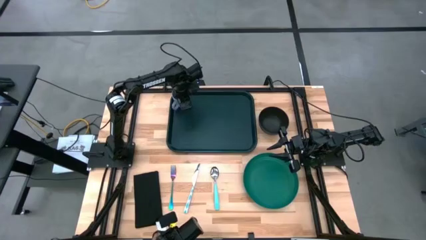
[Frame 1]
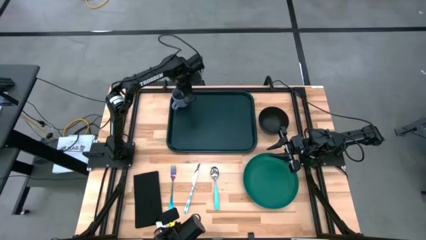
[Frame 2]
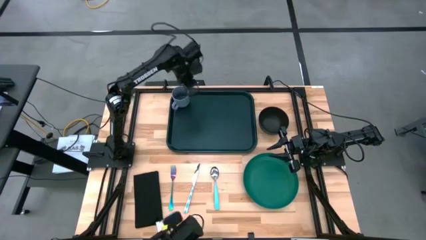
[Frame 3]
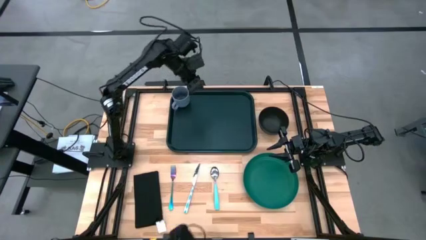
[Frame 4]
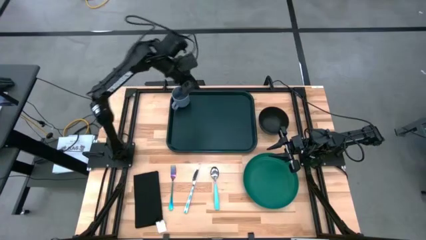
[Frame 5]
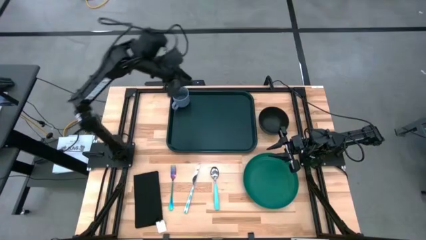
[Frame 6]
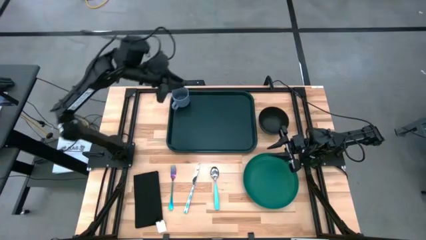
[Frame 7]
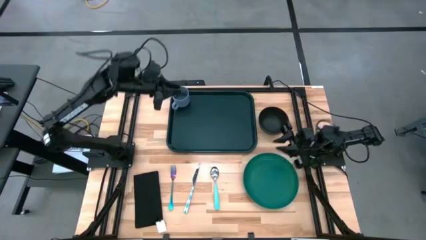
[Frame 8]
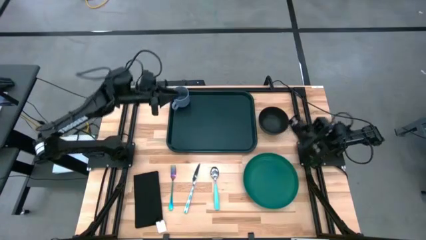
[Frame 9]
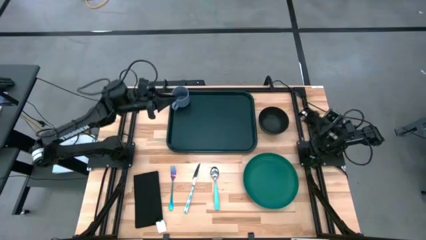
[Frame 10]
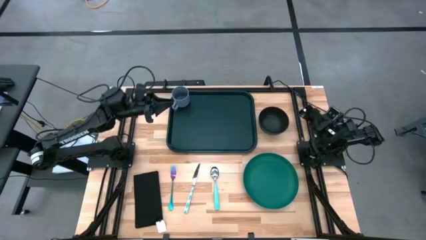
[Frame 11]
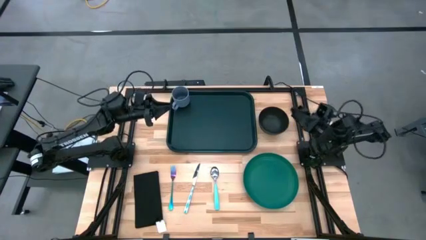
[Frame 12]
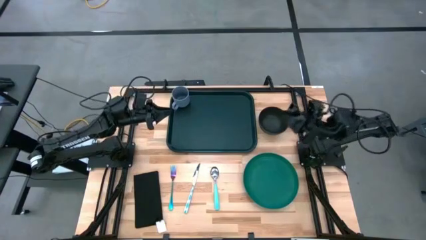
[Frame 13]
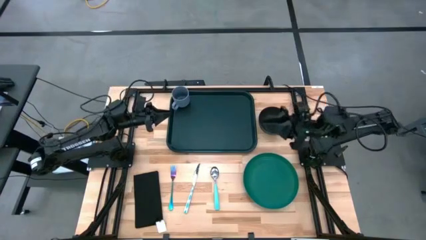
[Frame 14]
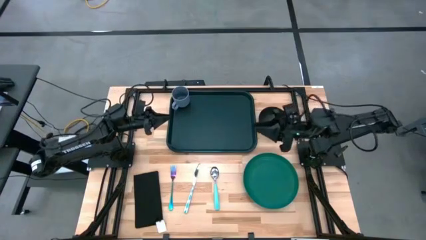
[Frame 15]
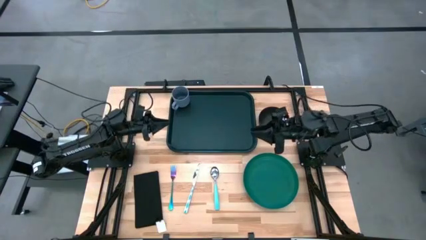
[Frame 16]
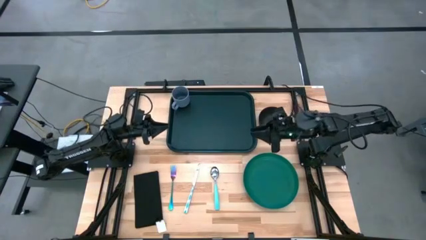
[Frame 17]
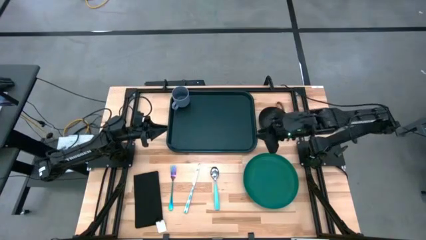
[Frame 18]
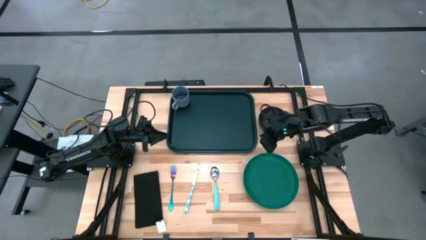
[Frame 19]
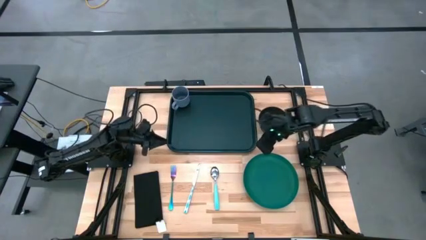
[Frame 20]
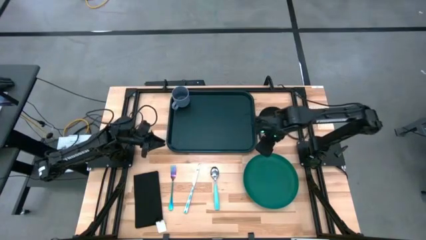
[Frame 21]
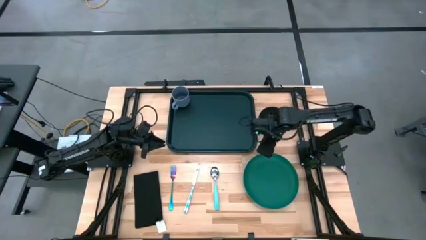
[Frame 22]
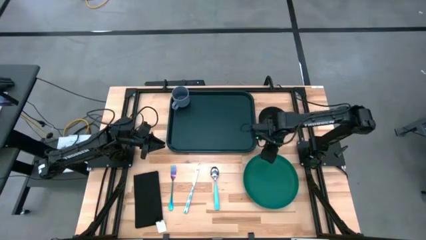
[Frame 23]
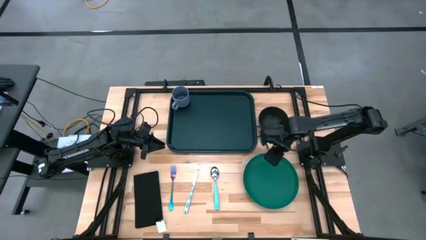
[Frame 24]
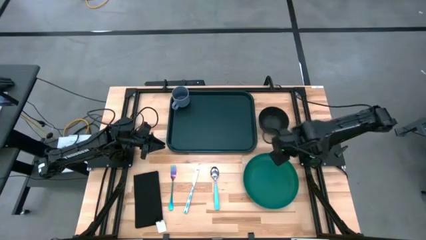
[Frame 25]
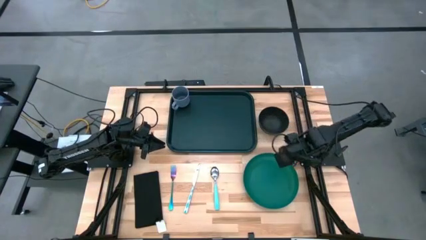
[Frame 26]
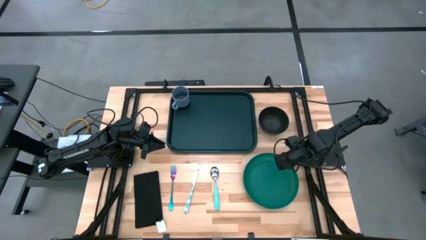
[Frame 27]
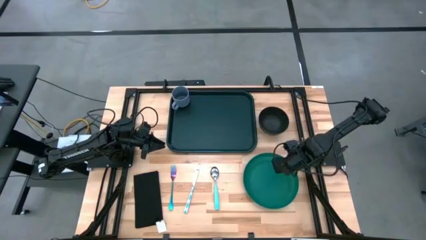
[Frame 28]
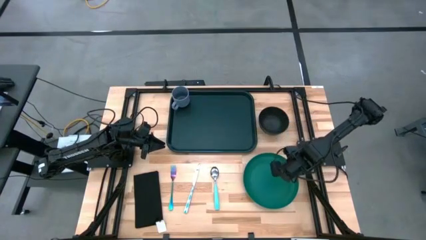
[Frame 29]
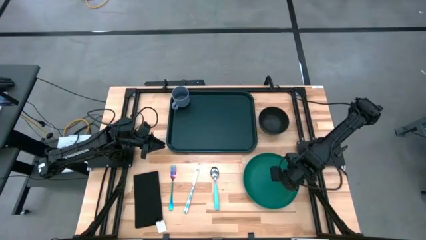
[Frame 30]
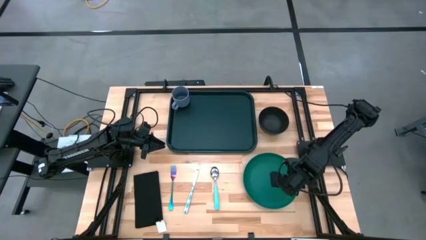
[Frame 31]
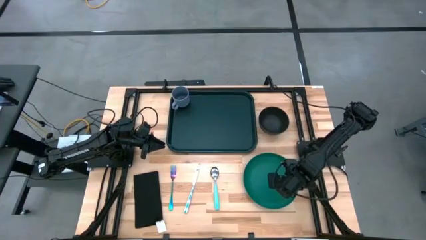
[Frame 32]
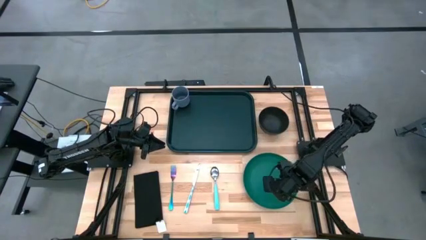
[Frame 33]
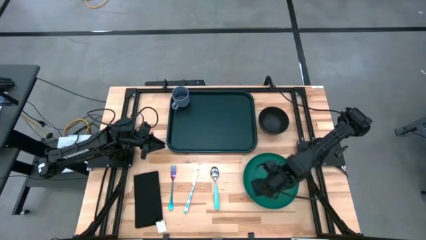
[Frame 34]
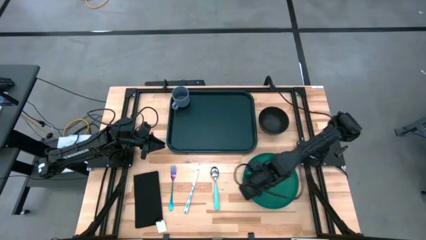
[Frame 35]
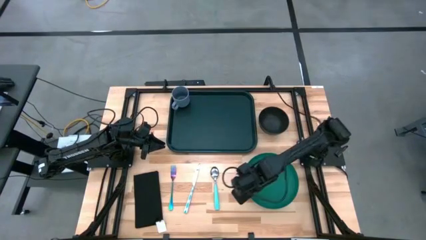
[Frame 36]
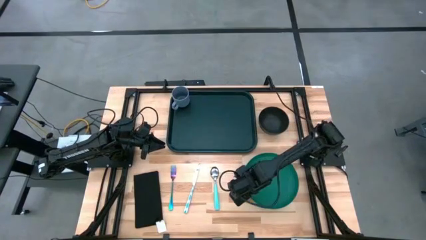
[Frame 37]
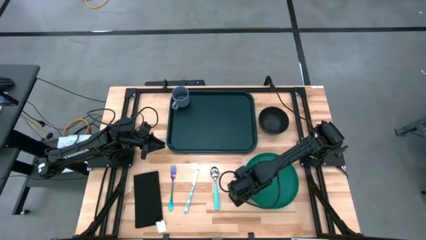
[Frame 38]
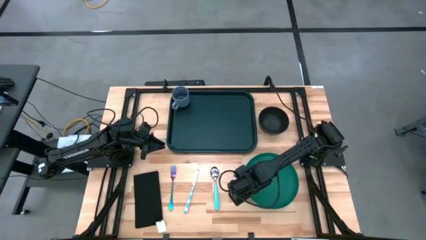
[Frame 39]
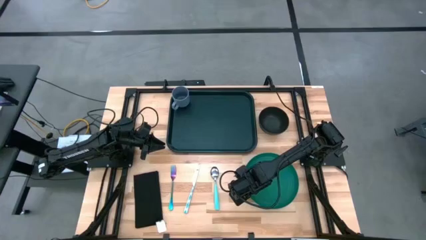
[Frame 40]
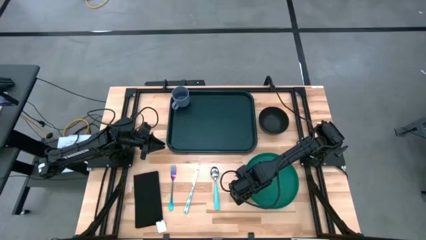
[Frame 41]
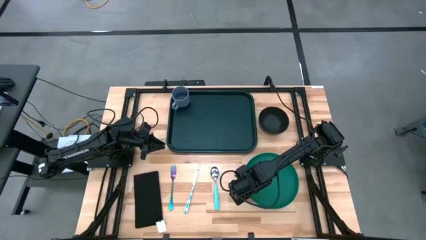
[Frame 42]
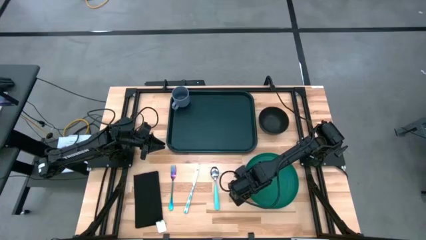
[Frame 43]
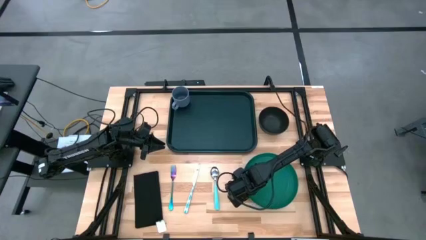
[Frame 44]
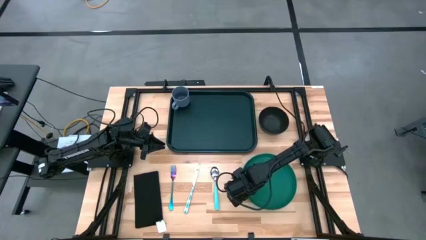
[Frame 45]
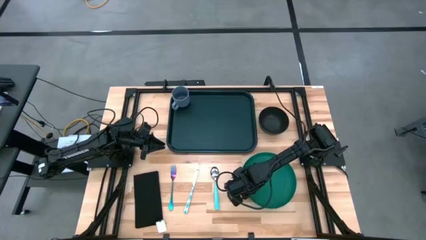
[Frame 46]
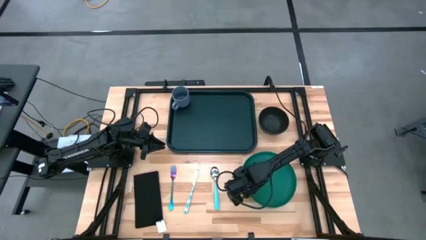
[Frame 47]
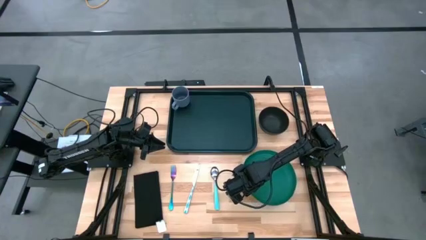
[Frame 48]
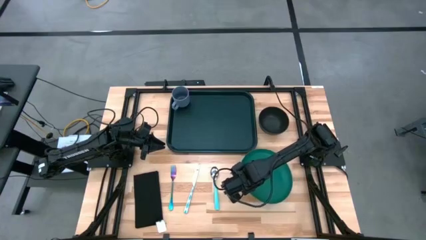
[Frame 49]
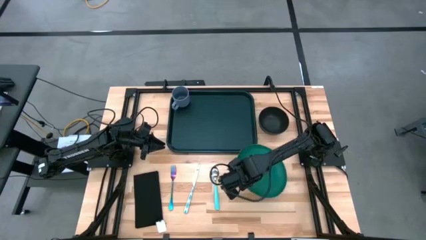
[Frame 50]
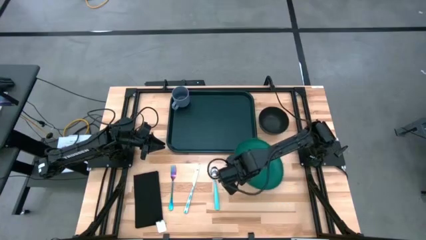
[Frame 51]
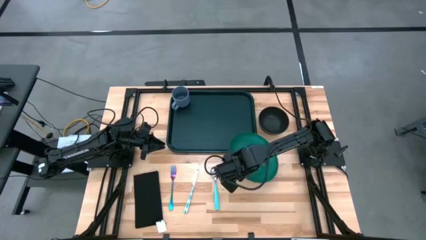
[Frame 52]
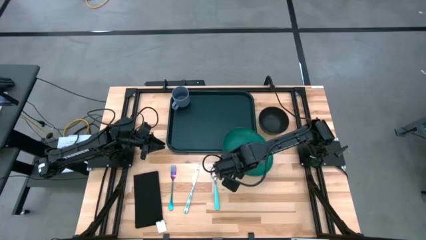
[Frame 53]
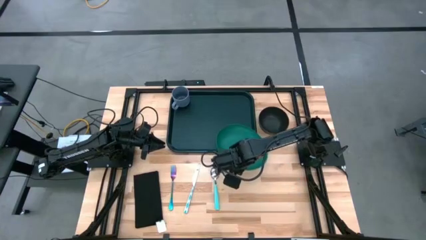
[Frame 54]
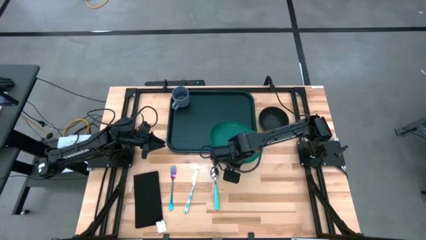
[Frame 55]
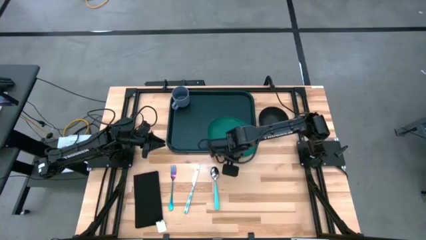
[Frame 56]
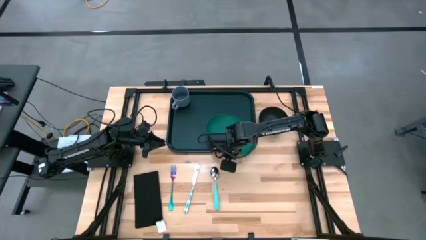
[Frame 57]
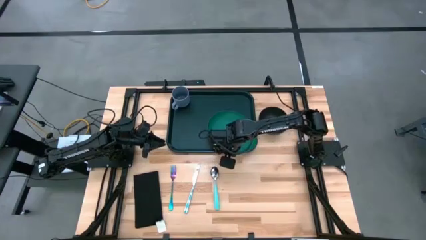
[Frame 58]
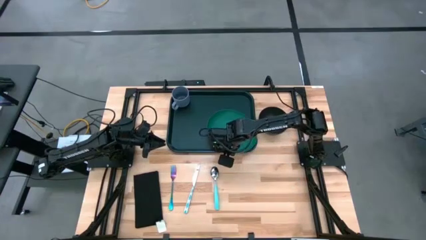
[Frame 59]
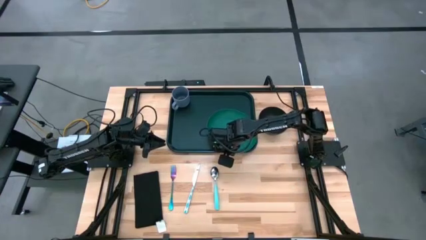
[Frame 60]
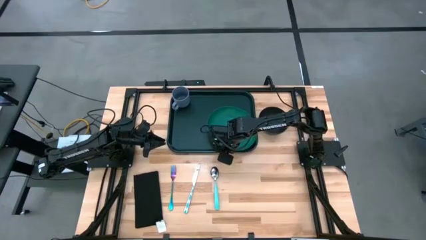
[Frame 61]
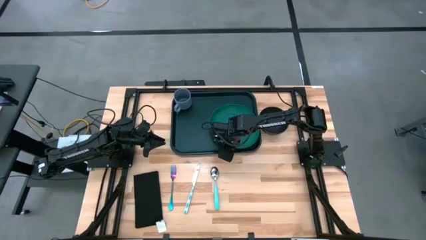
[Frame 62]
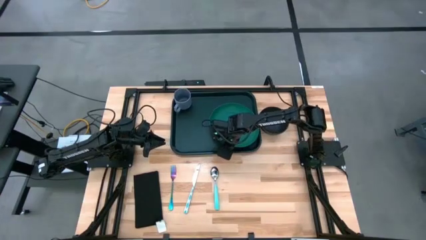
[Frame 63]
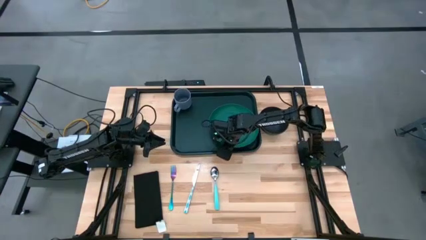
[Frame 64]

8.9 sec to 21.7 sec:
Task: Set up tray
Put the green plate on the black tray
